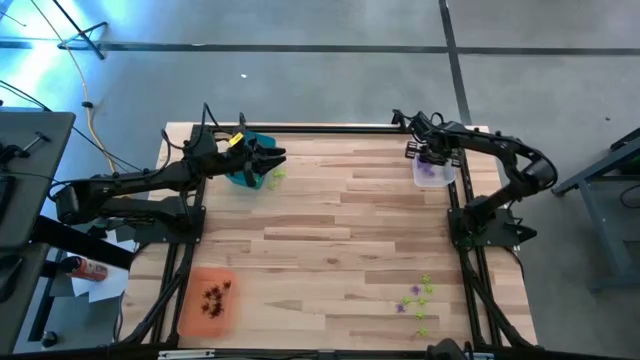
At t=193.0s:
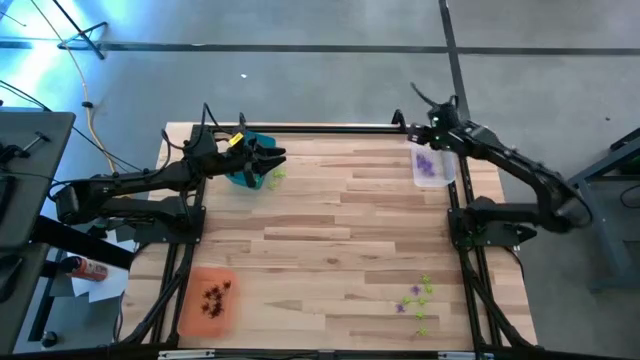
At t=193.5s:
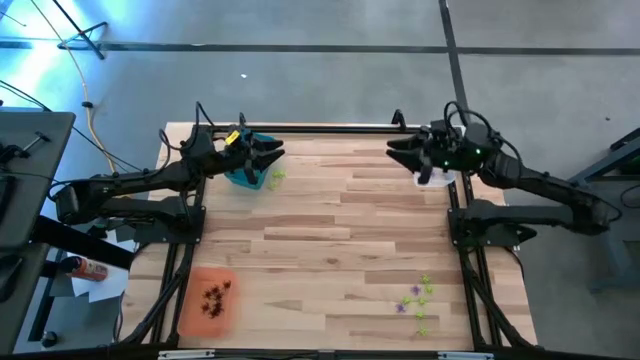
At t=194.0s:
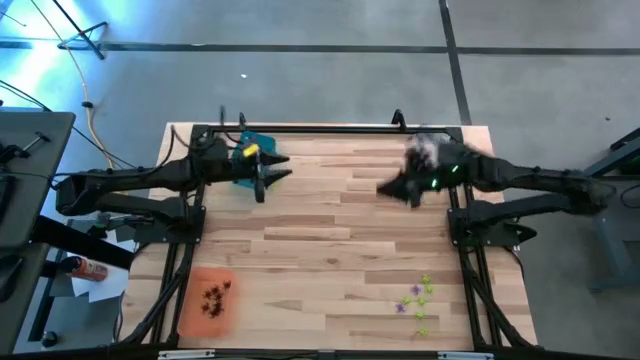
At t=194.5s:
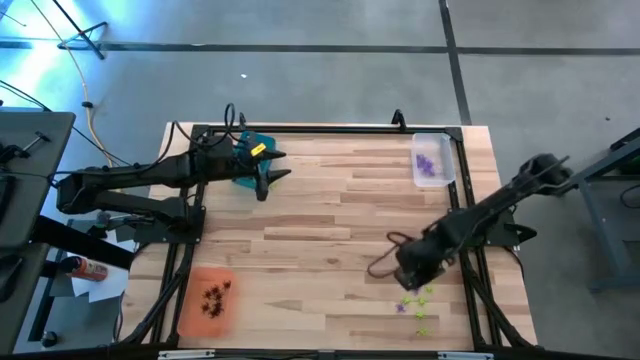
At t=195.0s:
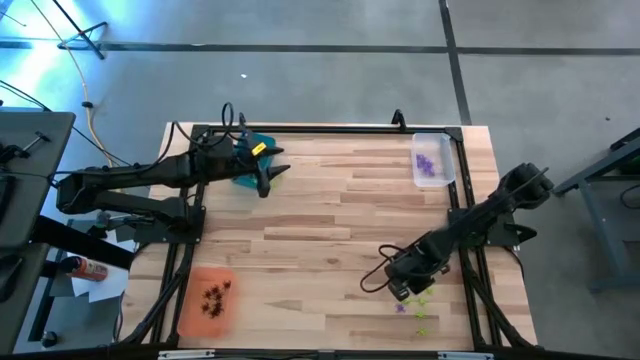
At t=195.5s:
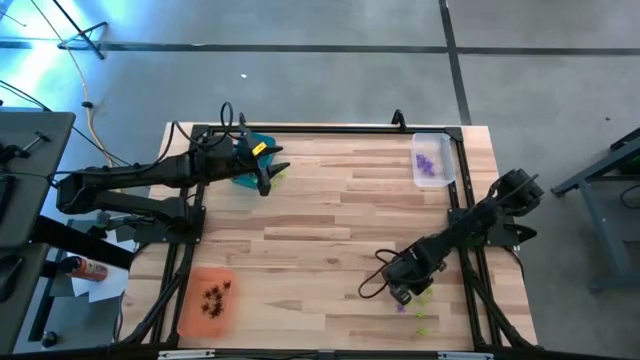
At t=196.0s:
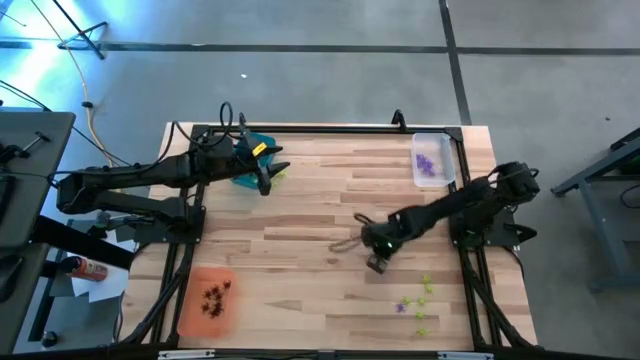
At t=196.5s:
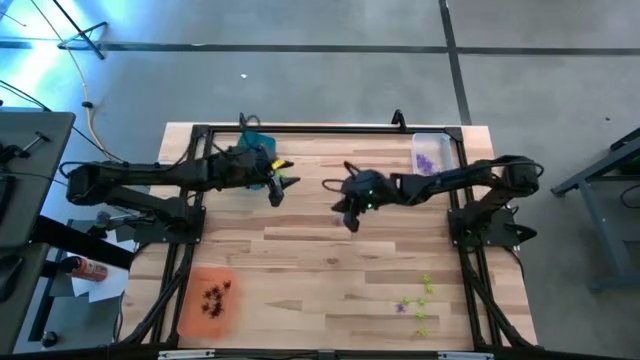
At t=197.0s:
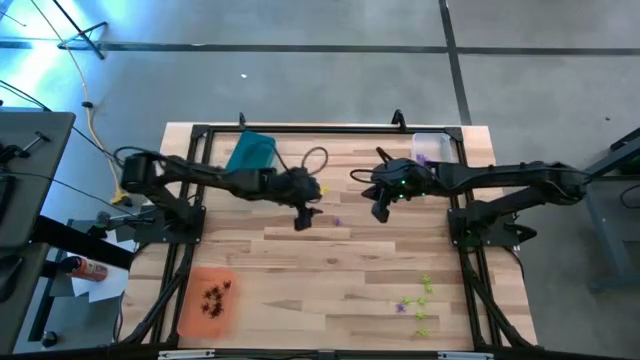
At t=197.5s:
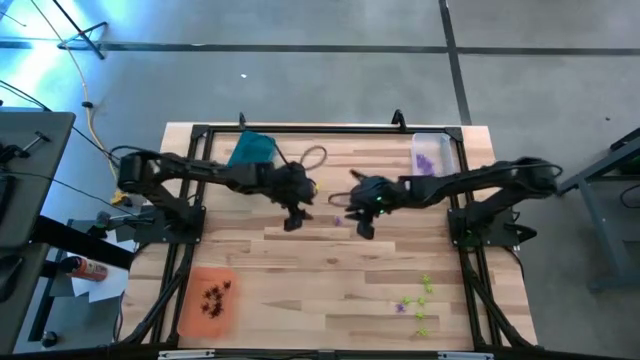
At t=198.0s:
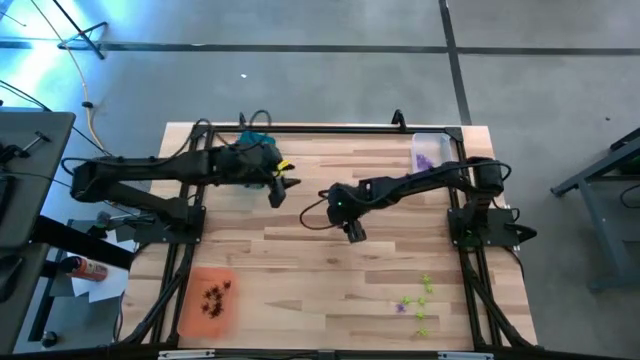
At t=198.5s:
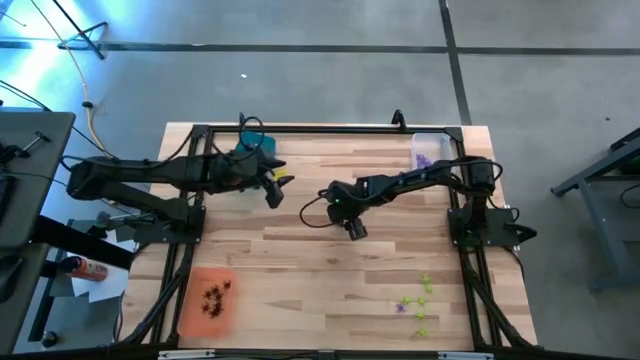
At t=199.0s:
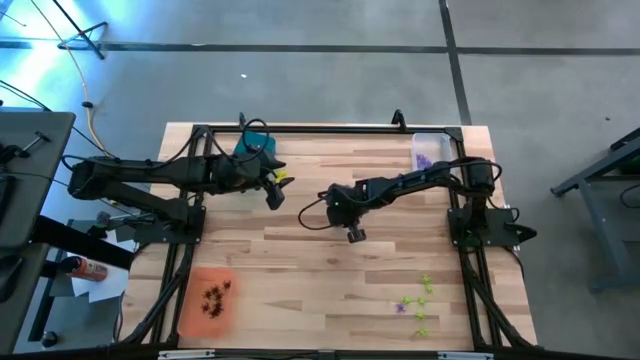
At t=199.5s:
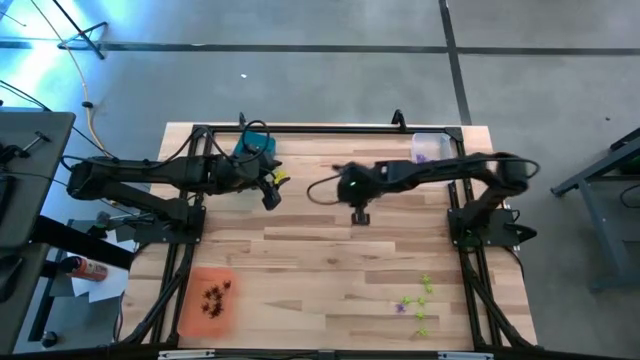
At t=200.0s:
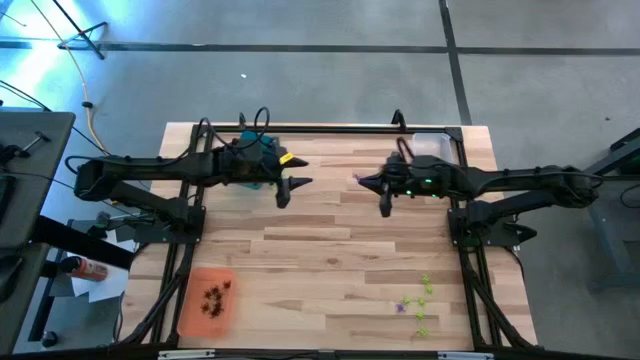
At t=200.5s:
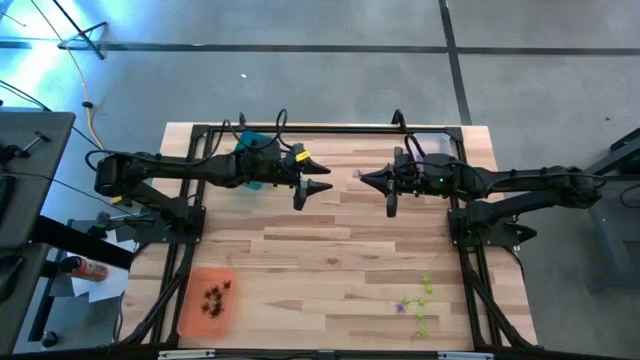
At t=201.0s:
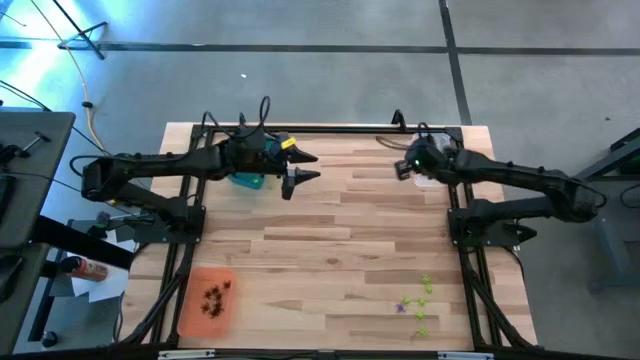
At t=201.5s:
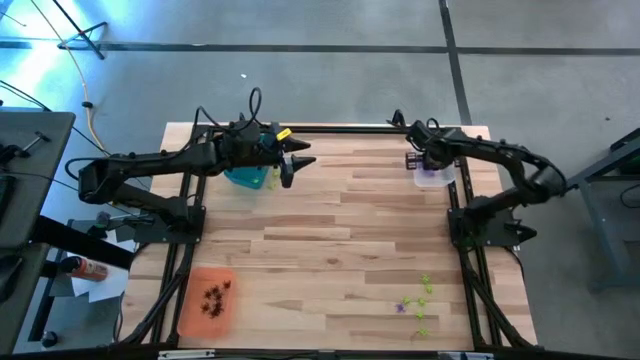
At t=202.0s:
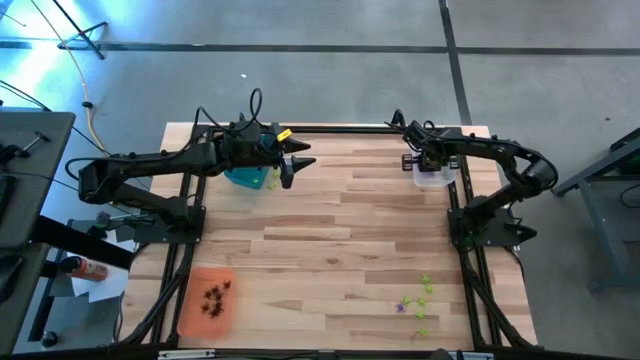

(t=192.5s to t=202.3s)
Task: Sort Halloween decoration
Put the purple spider toy into the transparent bin

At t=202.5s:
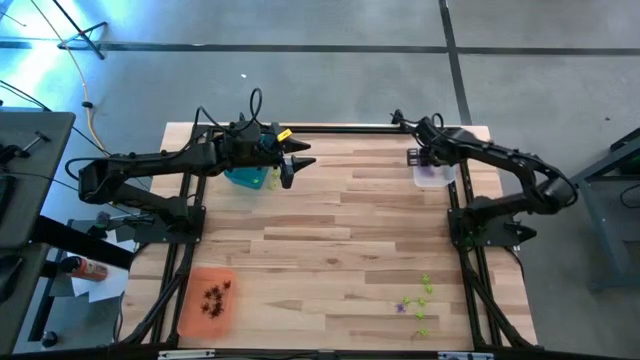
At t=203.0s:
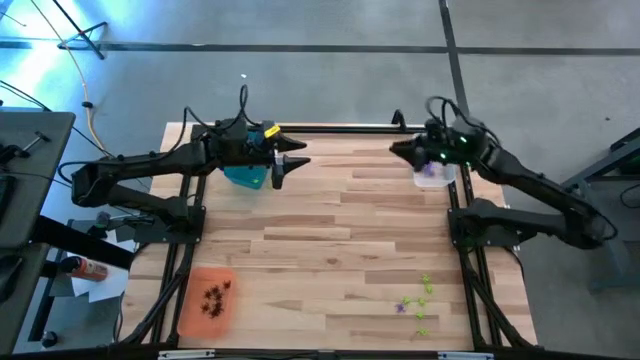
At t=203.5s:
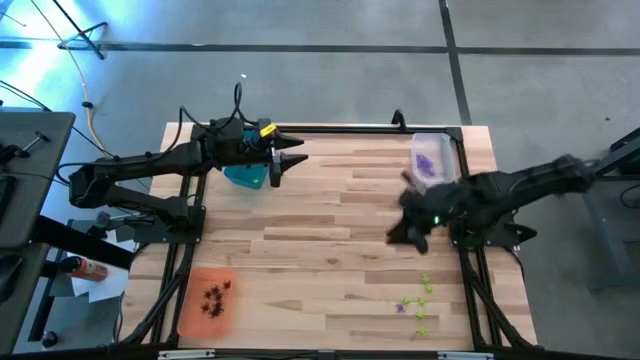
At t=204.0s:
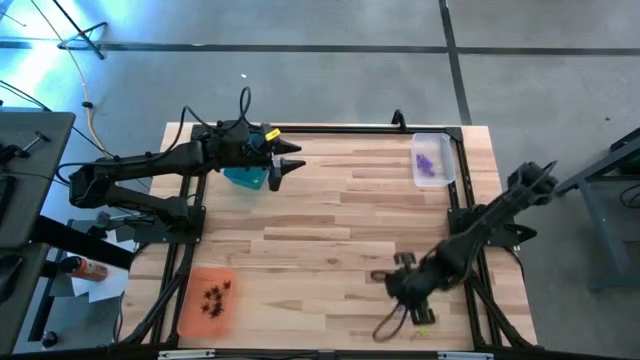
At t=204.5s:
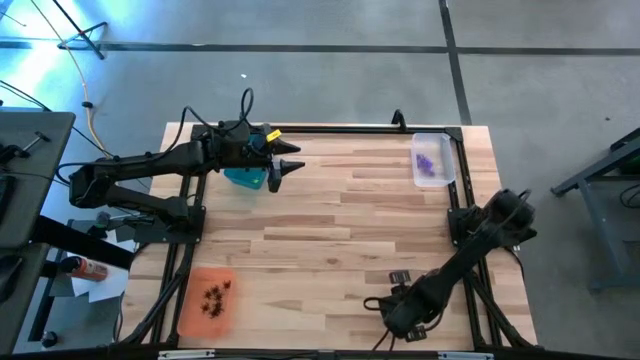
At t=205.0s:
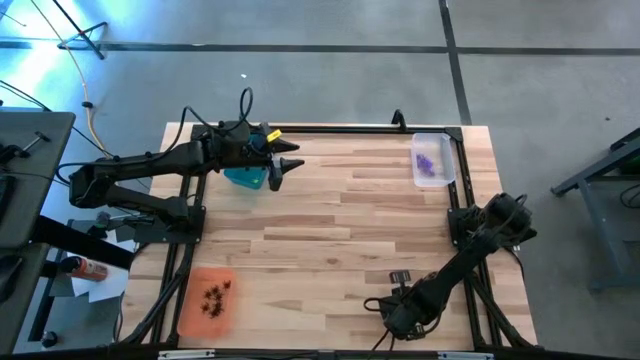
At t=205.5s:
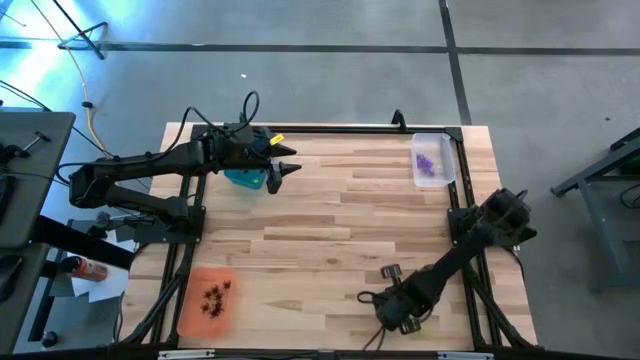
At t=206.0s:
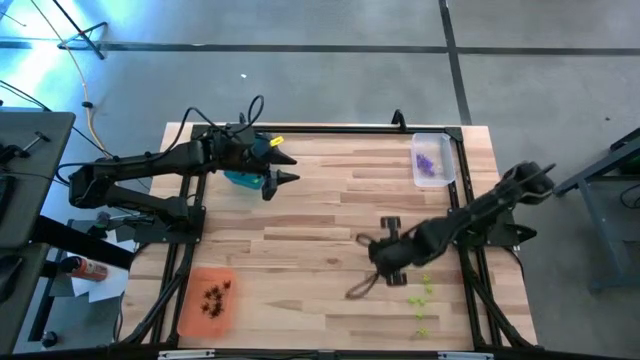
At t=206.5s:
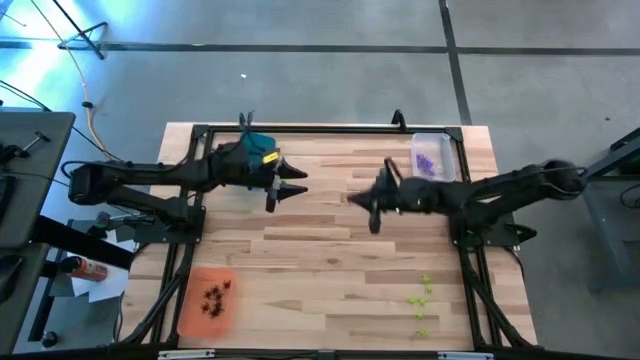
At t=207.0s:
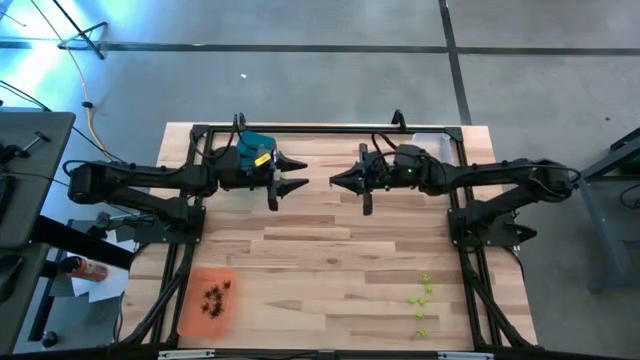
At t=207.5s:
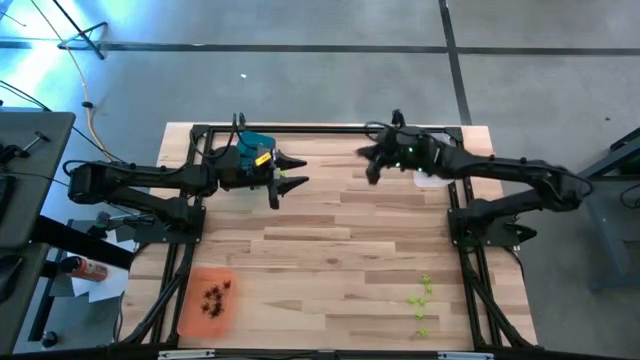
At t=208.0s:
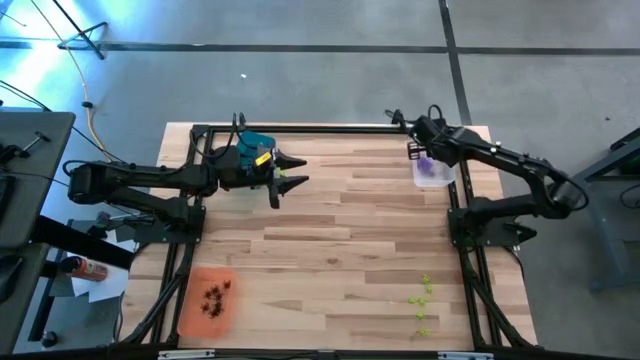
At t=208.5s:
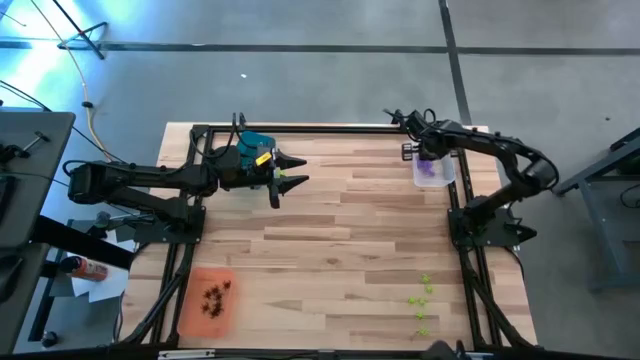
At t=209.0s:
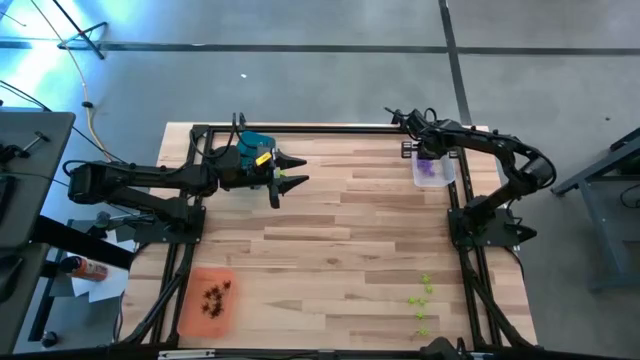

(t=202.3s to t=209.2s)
Put the purple spider toy into the transparent bin

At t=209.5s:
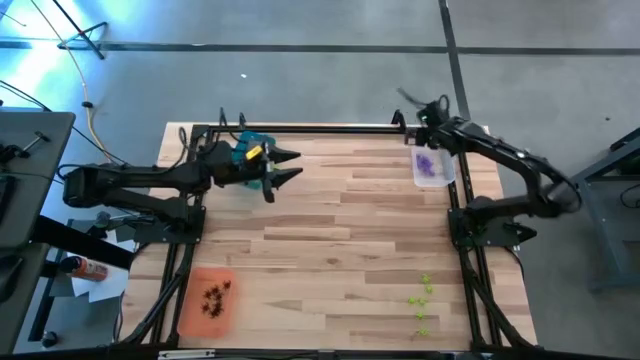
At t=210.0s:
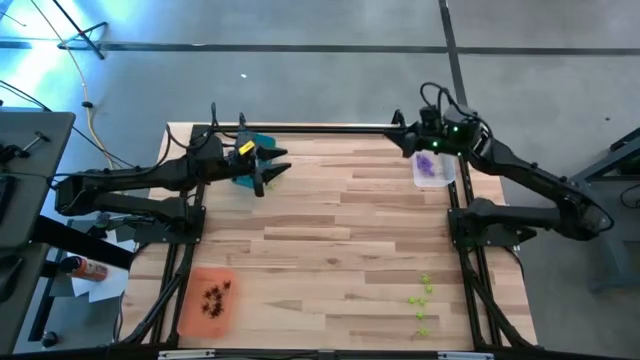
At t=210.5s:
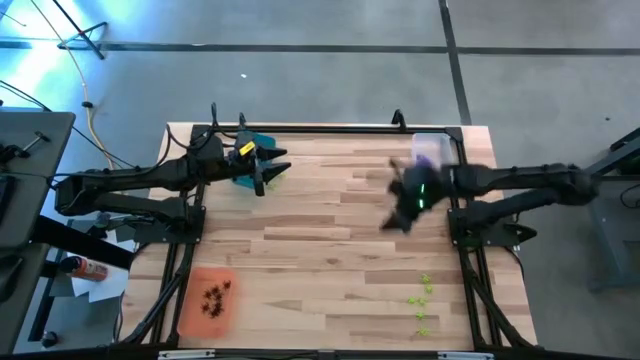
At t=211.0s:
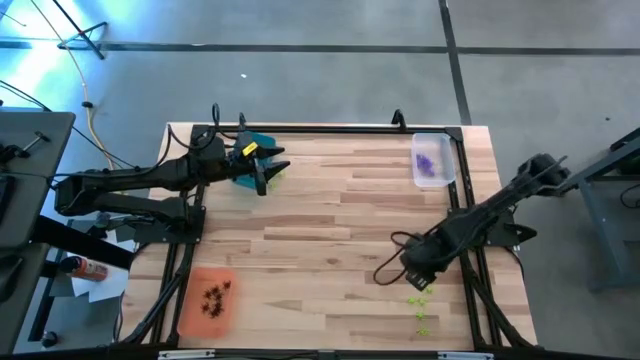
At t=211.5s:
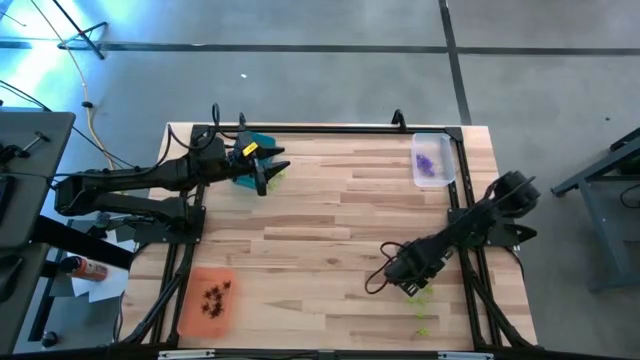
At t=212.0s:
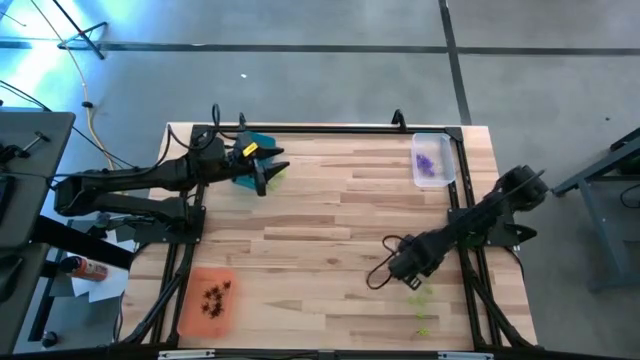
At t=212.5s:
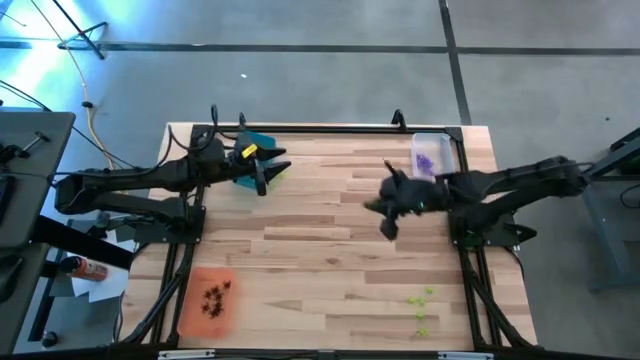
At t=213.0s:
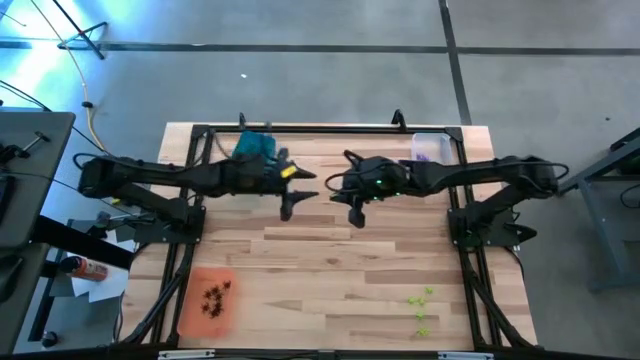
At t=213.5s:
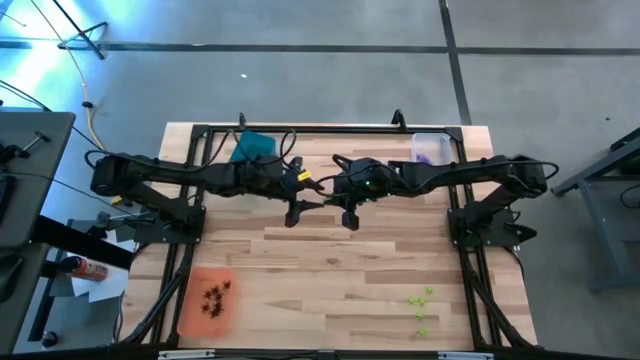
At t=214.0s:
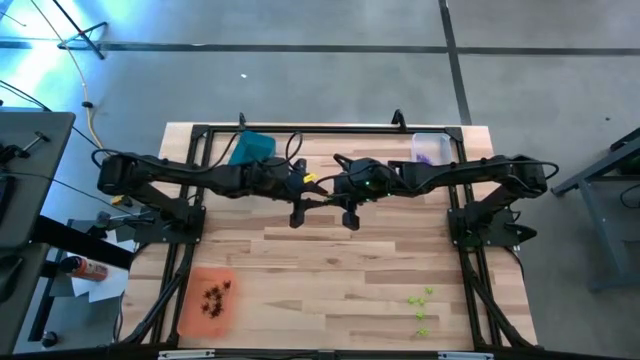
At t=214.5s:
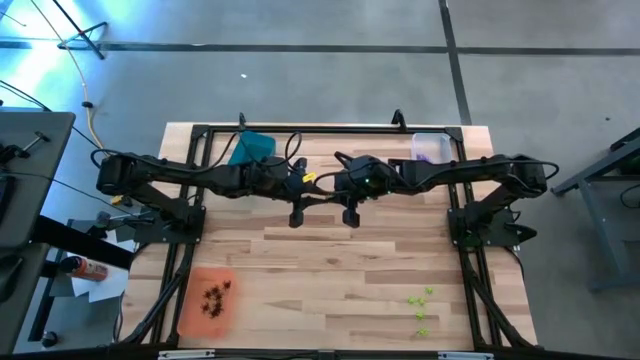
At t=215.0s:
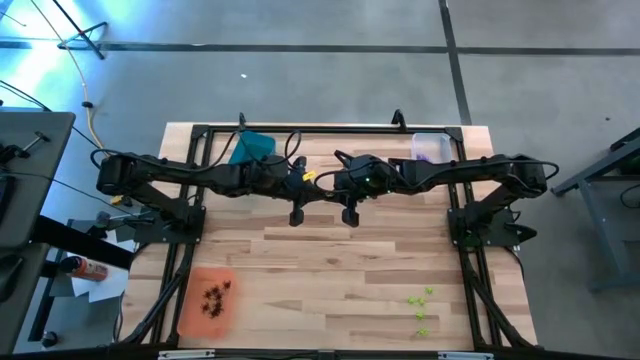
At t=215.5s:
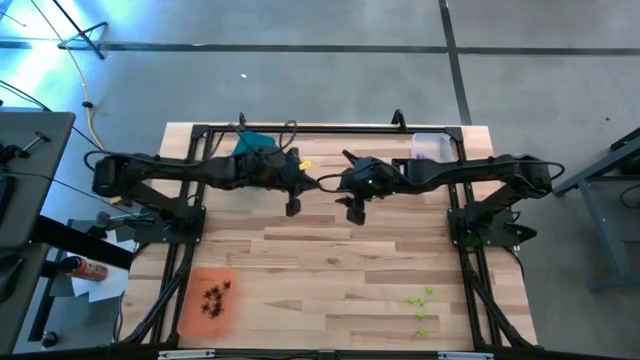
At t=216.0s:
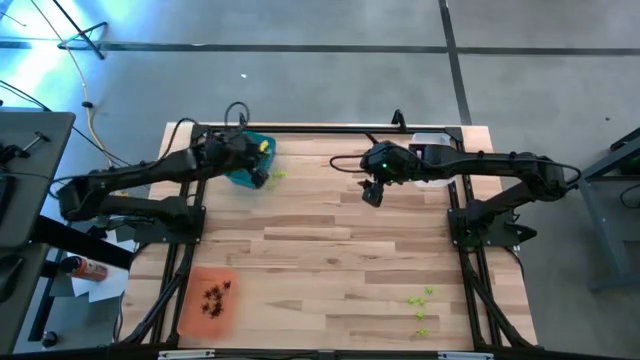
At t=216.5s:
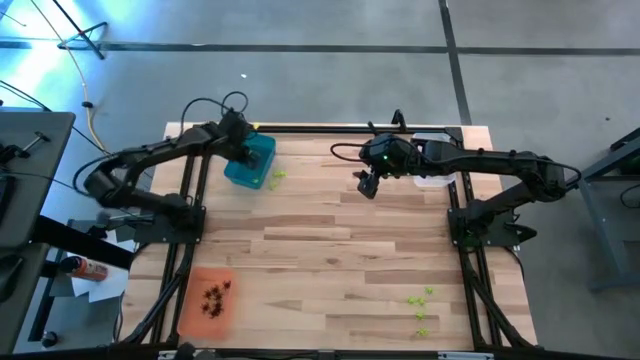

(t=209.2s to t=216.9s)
Put the green spider toy into the blue bin
